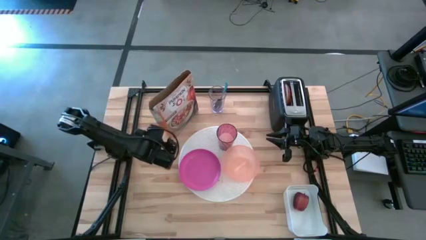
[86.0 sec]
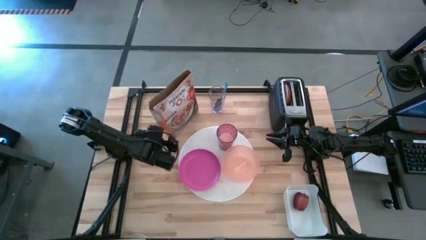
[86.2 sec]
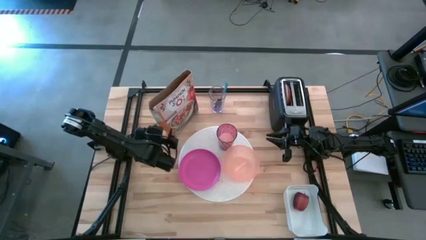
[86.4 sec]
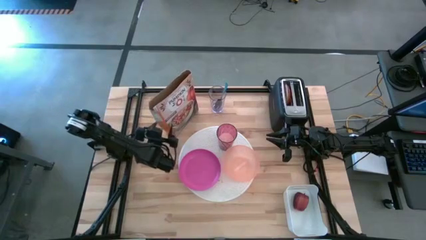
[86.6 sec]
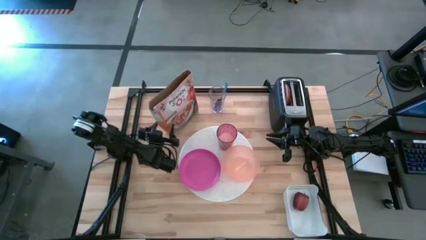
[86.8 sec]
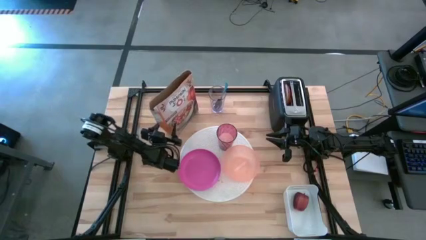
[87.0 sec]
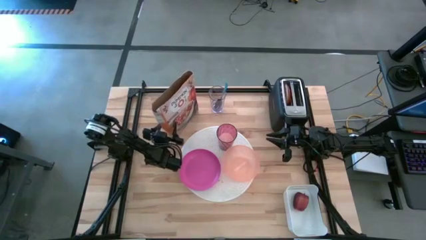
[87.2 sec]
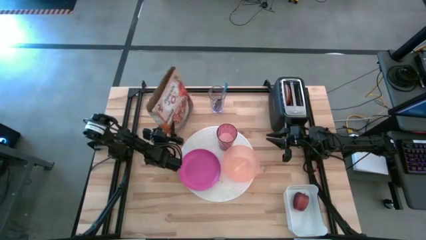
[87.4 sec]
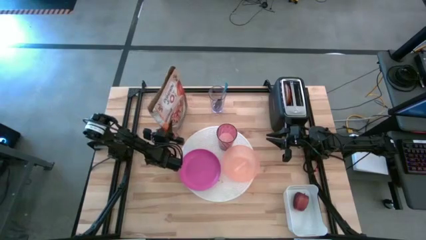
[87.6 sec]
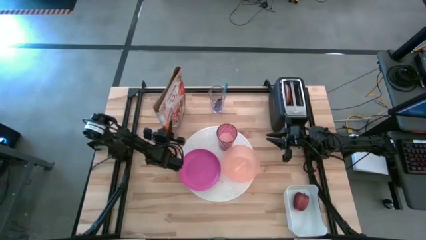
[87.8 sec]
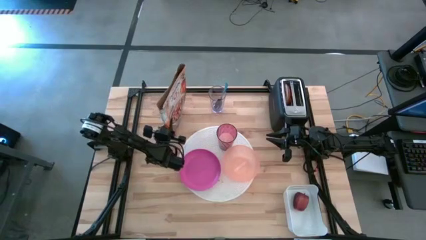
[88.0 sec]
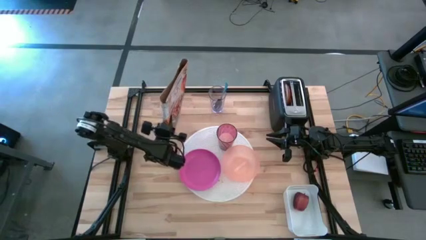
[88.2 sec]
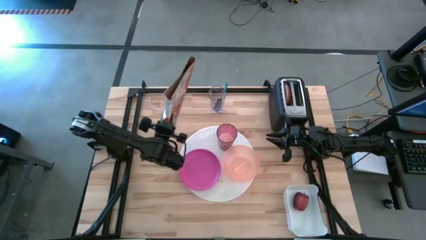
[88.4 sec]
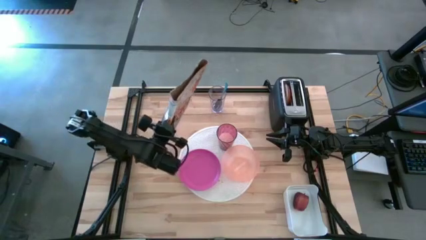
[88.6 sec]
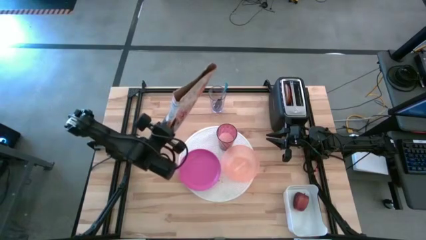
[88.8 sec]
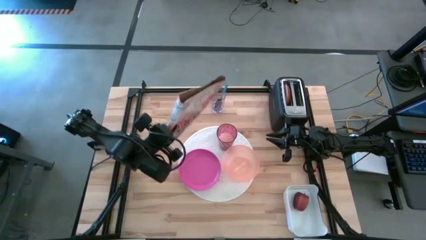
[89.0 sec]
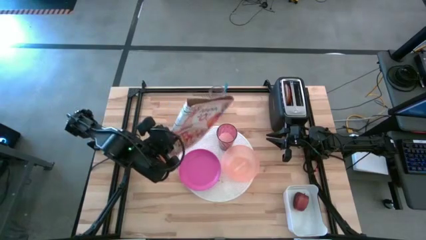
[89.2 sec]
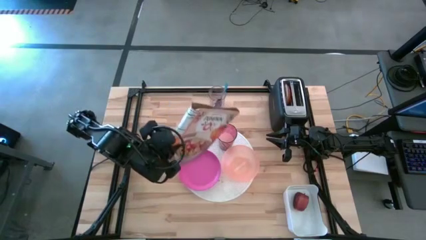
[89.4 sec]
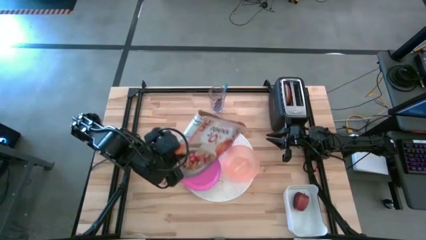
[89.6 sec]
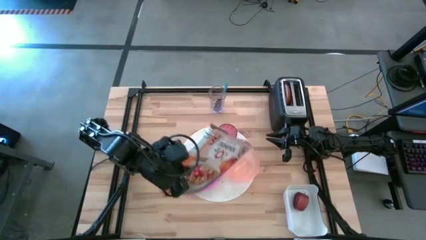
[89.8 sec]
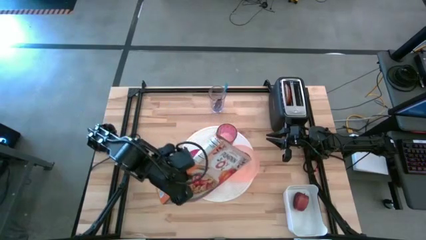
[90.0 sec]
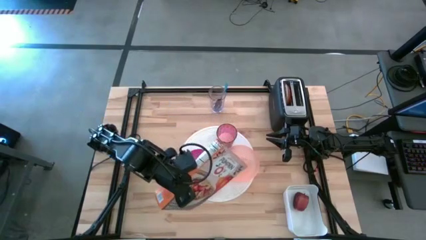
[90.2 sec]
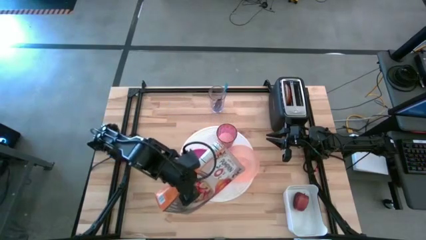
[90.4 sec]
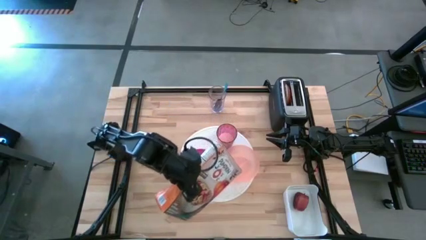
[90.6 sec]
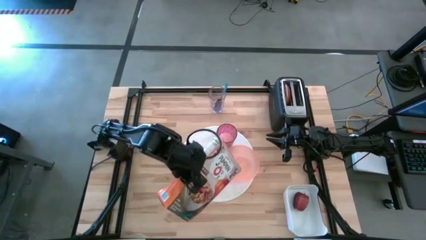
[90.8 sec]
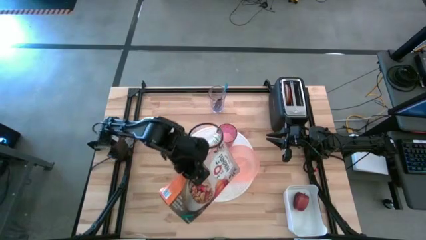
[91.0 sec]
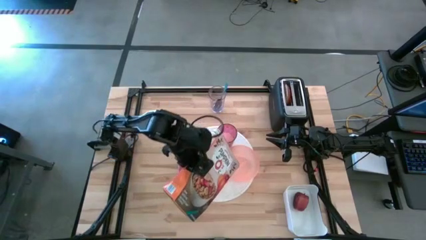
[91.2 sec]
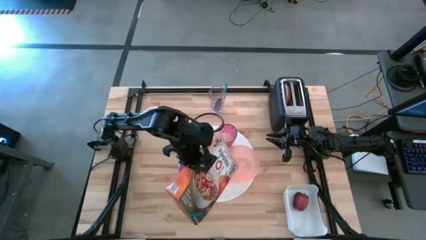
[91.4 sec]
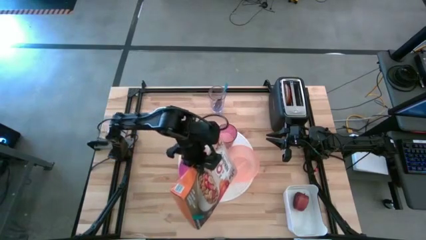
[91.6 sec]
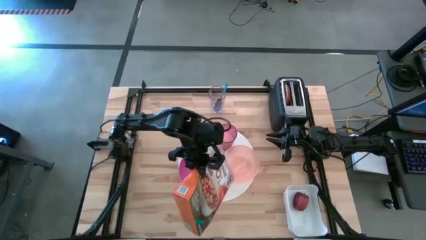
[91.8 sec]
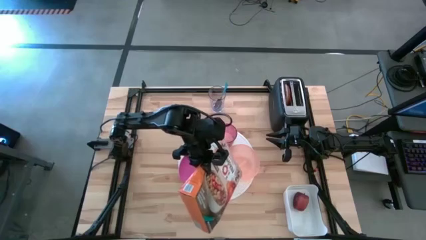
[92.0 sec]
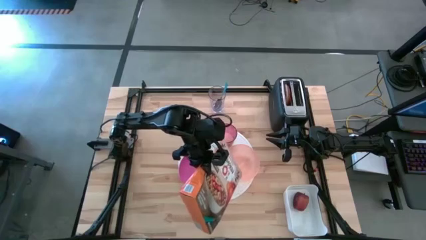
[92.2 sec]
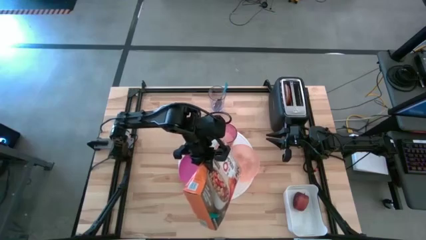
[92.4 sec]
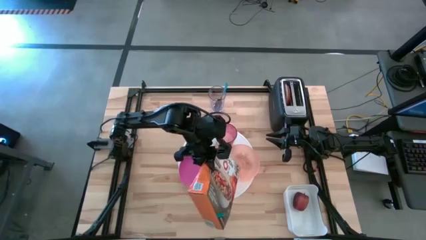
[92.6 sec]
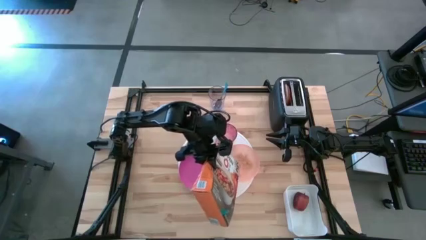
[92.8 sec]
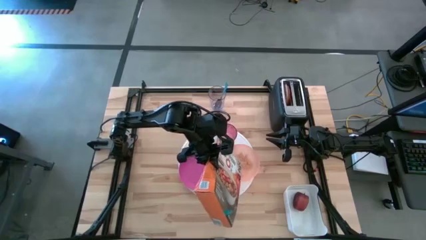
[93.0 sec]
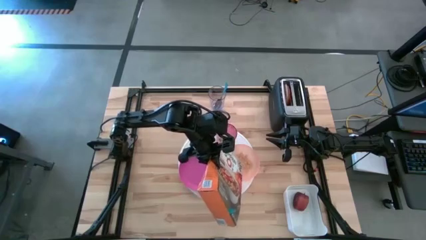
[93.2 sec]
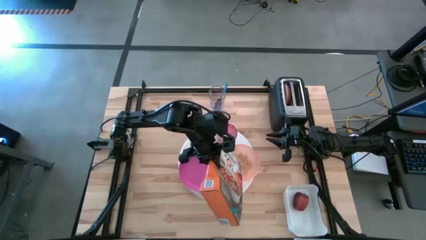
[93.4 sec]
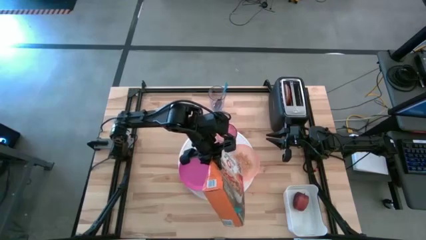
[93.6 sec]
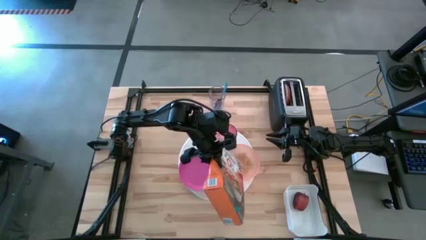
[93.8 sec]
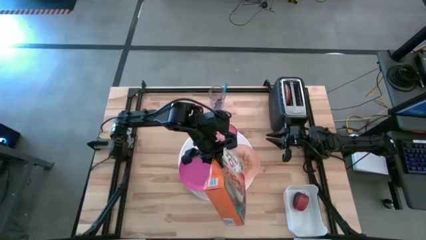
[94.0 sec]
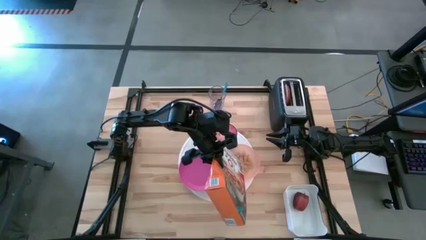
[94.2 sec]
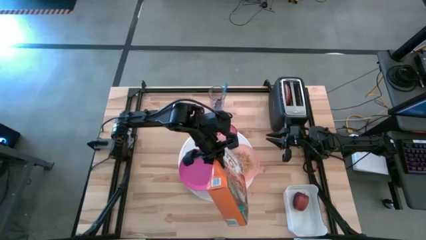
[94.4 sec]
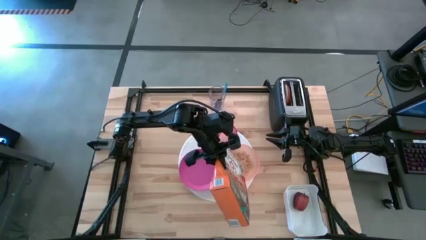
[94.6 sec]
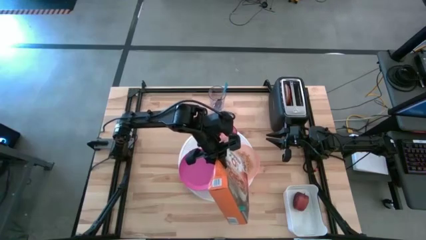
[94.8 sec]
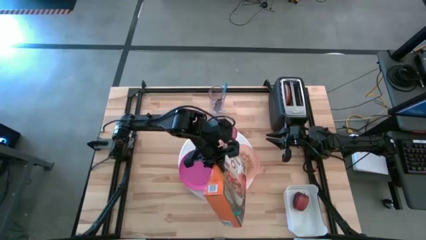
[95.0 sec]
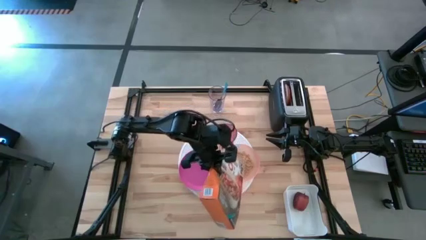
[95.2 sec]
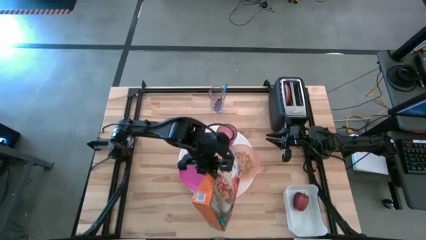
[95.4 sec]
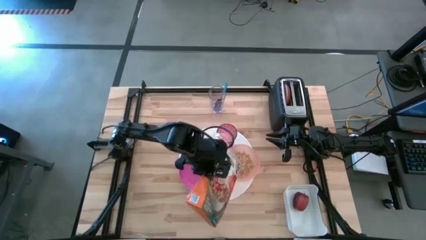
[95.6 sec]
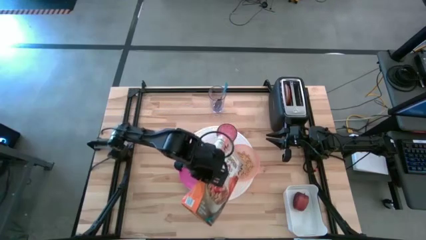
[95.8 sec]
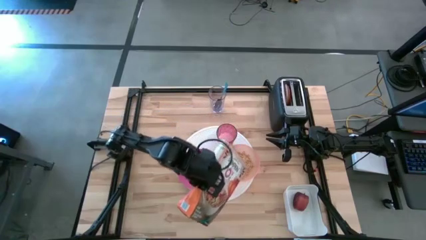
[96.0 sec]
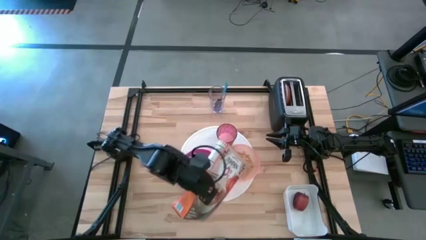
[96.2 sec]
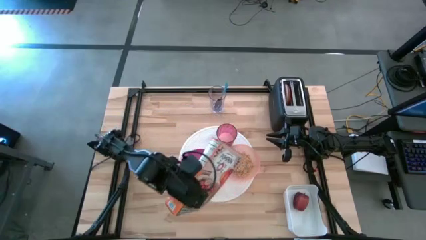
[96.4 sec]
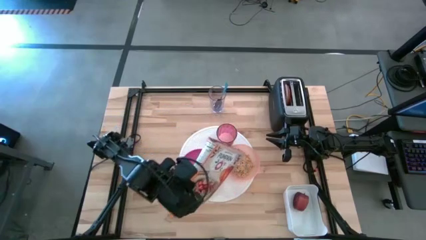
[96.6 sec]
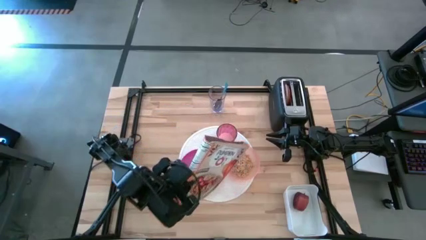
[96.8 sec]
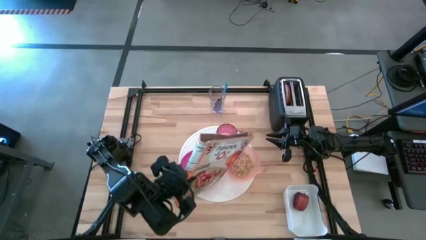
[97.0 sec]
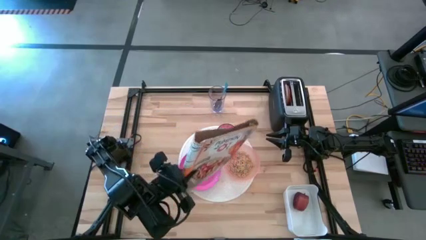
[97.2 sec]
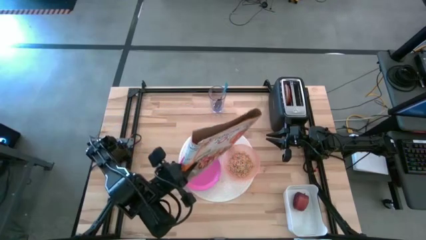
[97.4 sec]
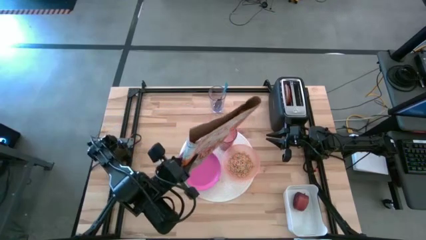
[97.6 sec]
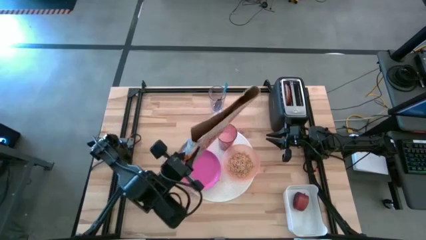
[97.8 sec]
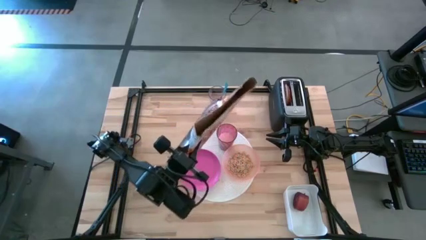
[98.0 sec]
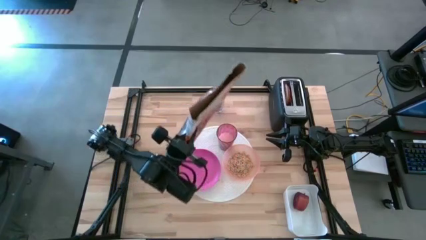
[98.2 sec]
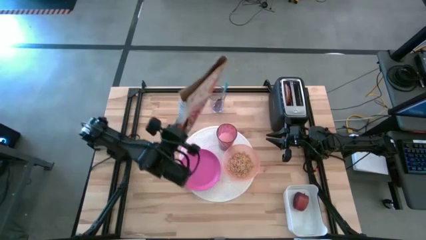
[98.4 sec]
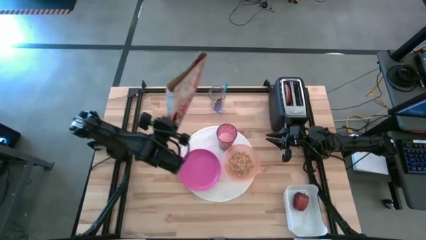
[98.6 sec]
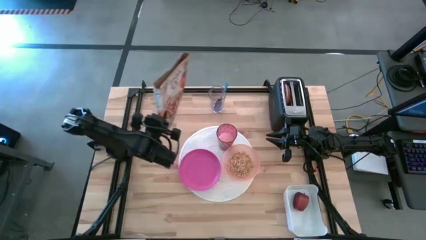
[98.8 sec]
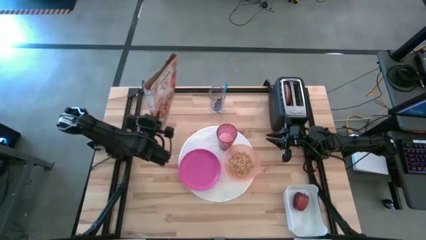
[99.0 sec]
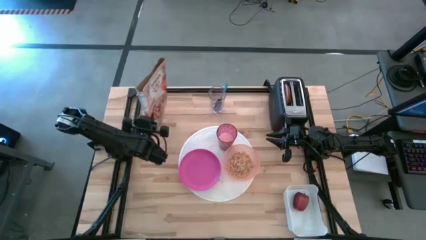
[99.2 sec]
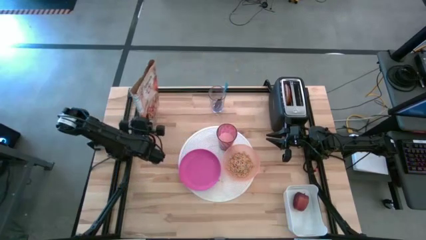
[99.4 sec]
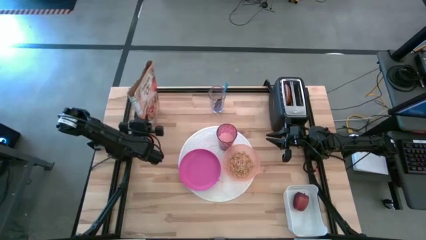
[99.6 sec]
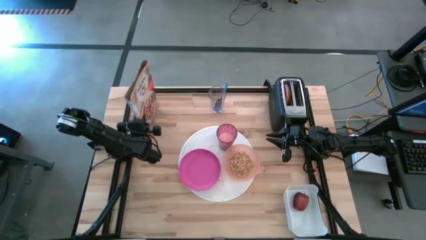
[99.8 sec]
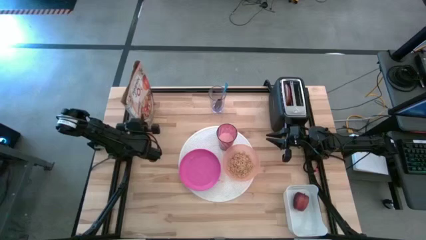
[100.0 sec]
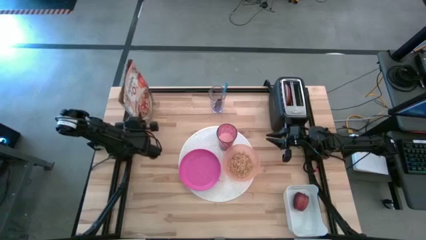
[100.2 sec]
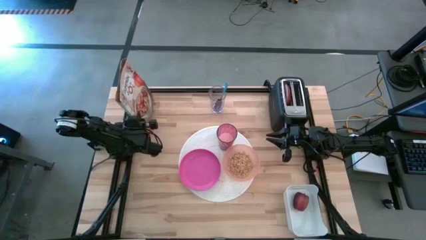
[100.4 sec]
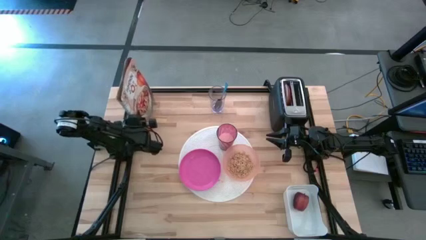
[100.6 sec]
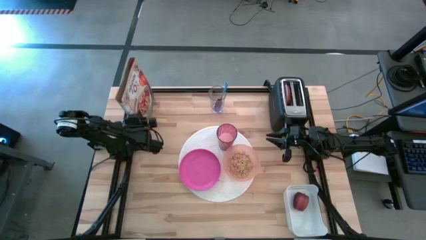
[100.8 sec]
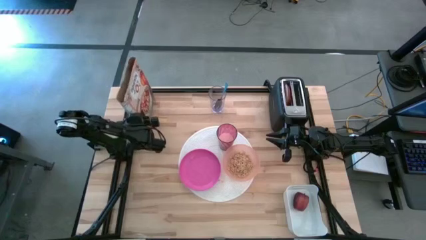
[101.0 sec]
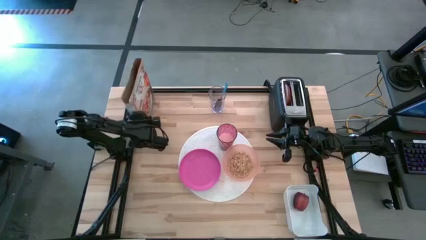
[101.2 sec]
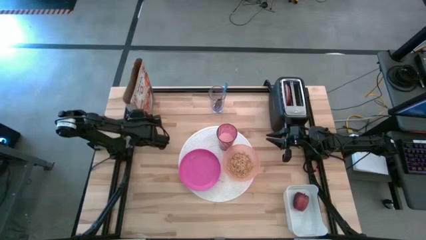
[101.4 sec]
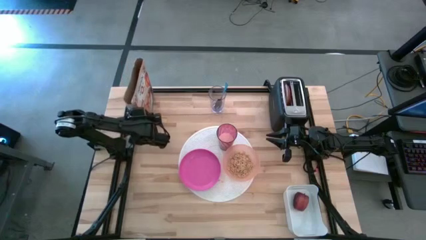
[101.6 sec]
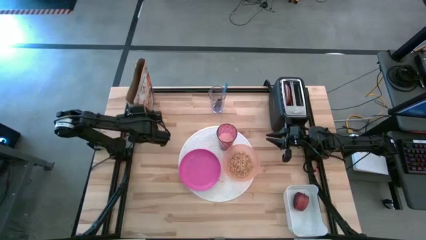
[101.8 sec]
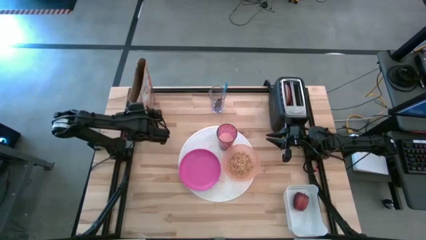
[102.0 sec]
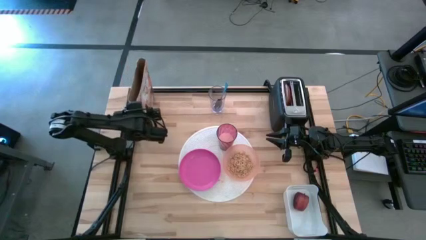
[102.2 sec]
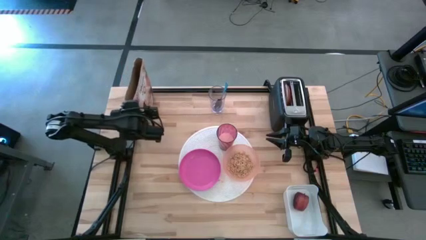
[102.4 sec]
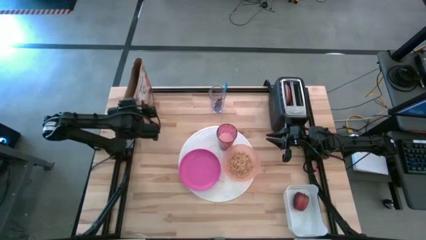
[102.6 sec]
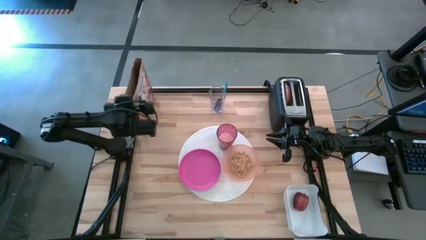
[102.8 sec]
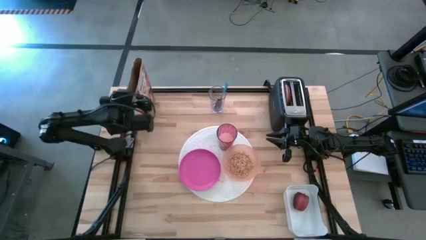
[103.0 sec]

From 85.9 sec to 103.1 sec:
Task: Arrange a breakfast setting
Pour the cereal from the cereal box into the orange bowl
